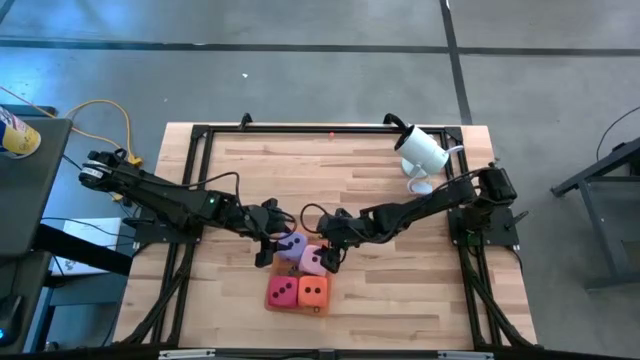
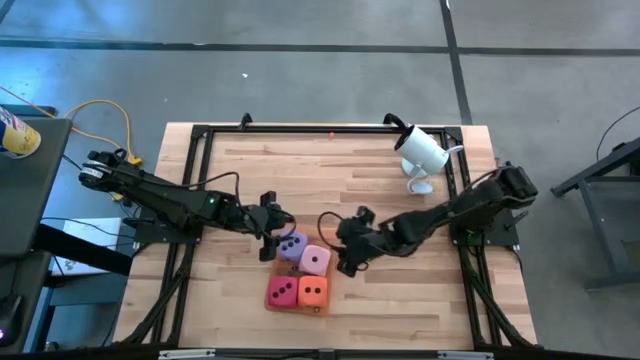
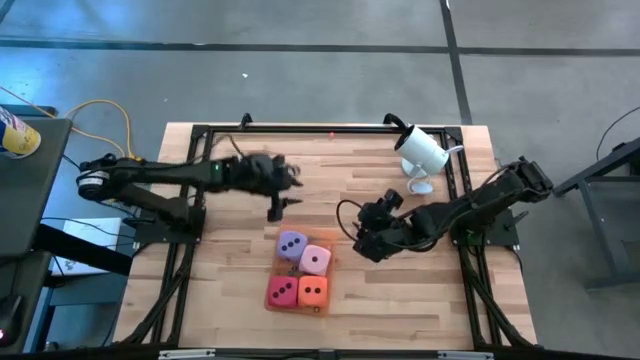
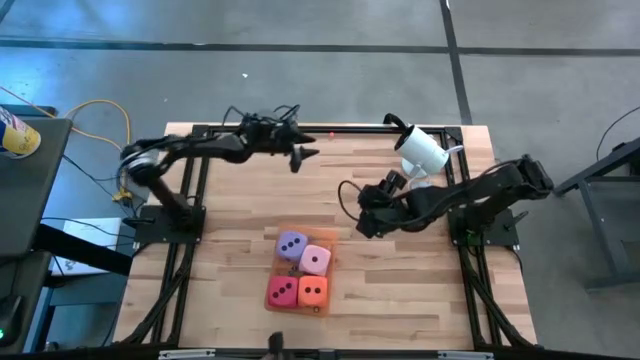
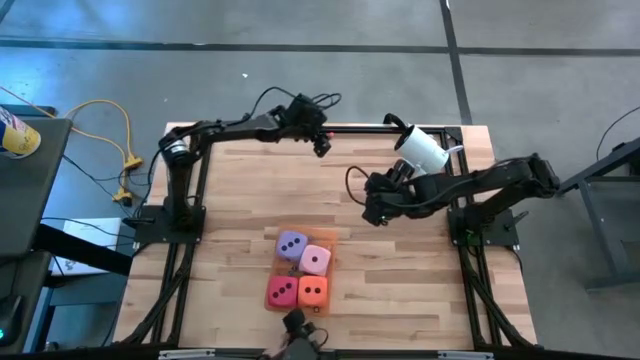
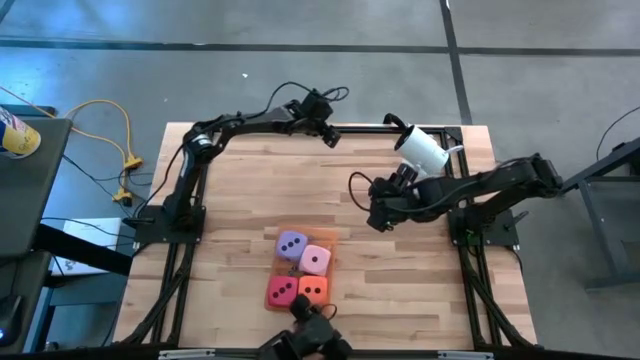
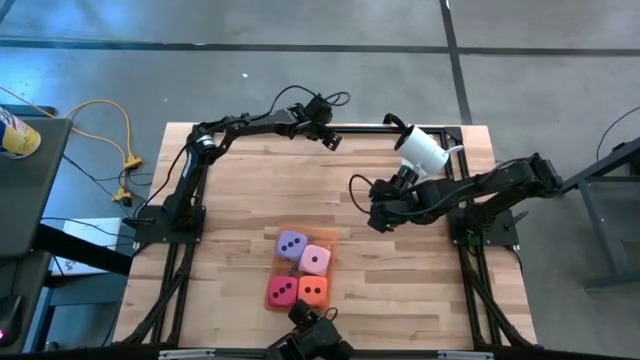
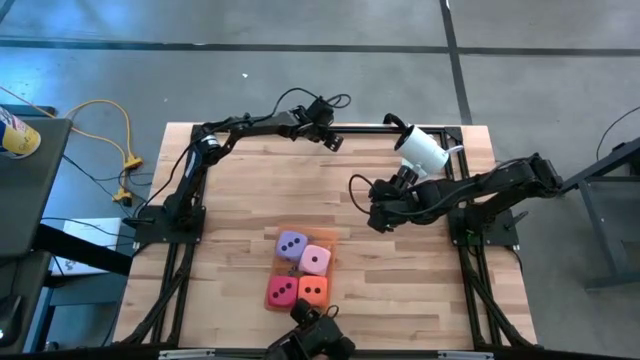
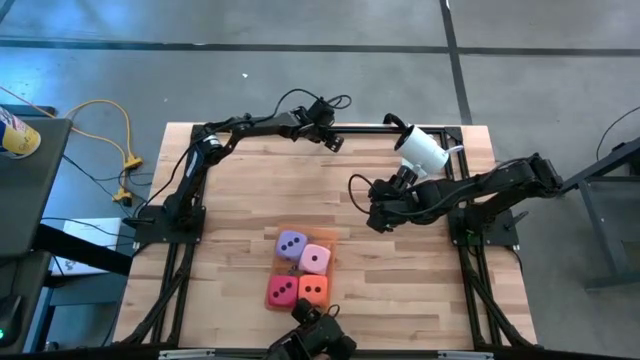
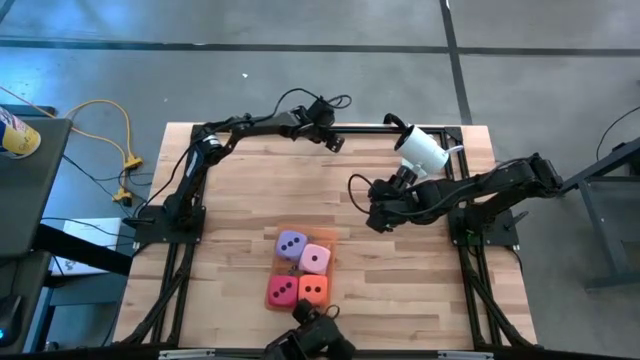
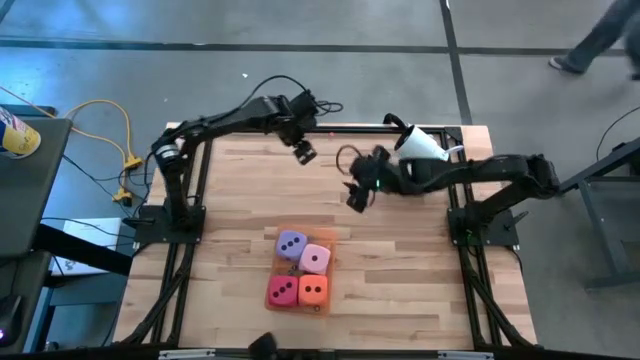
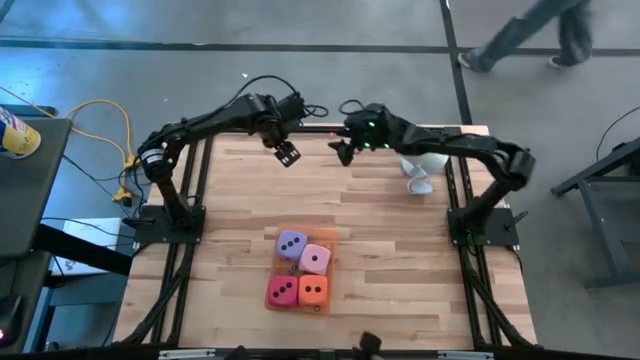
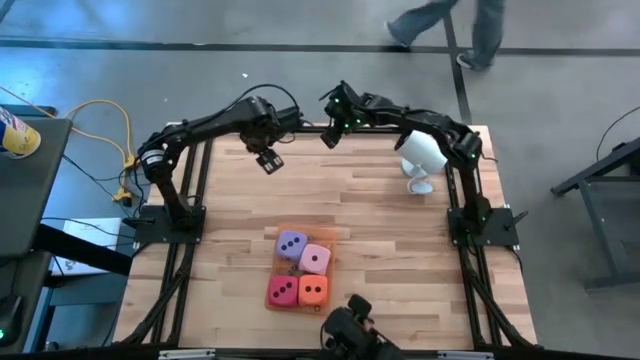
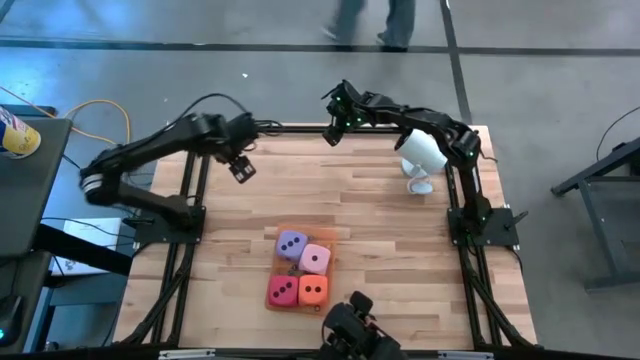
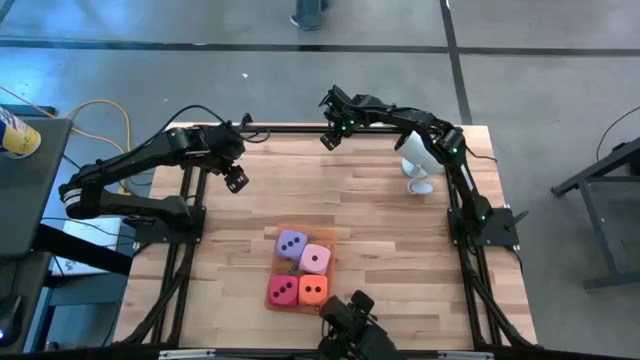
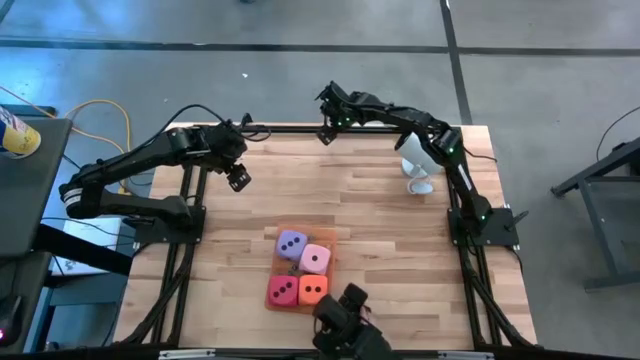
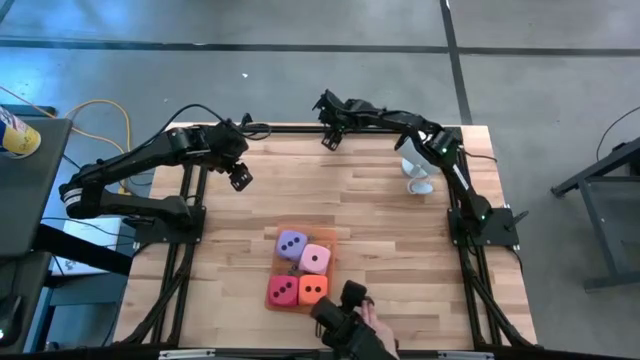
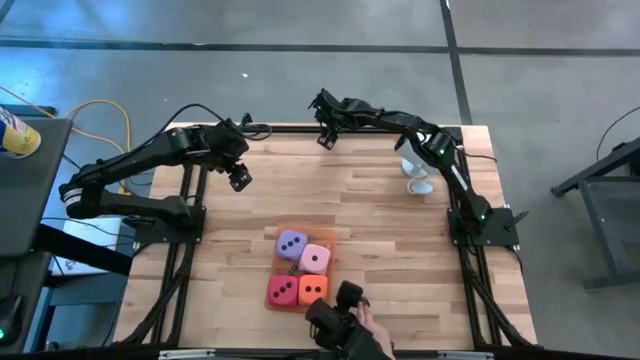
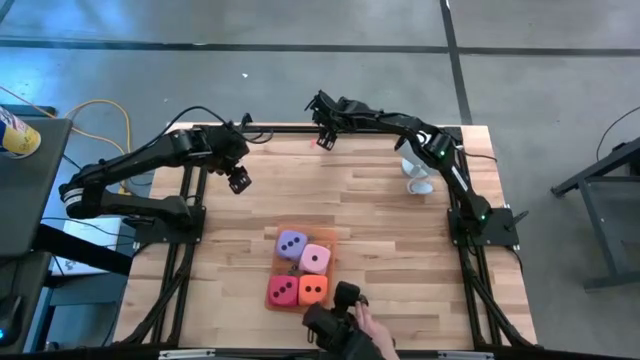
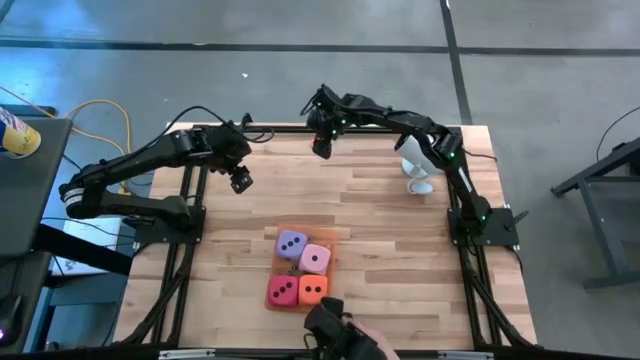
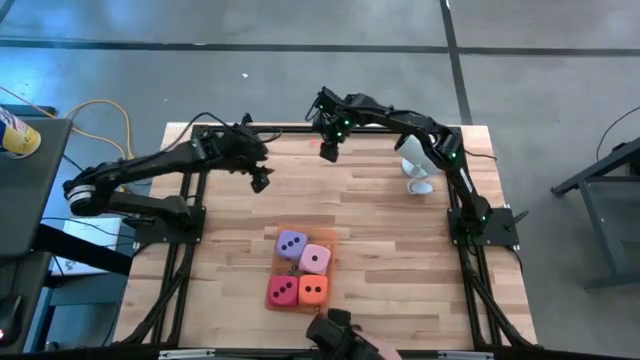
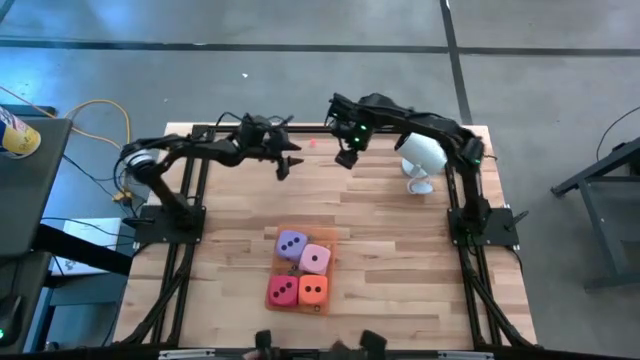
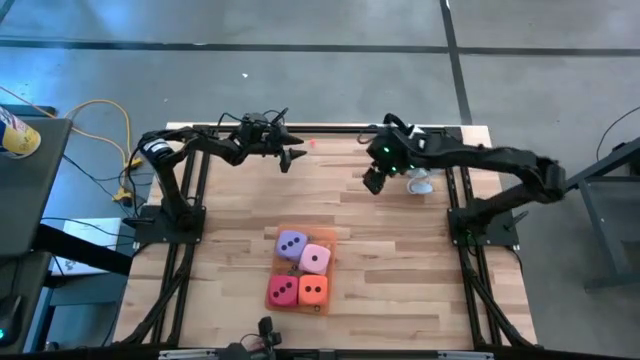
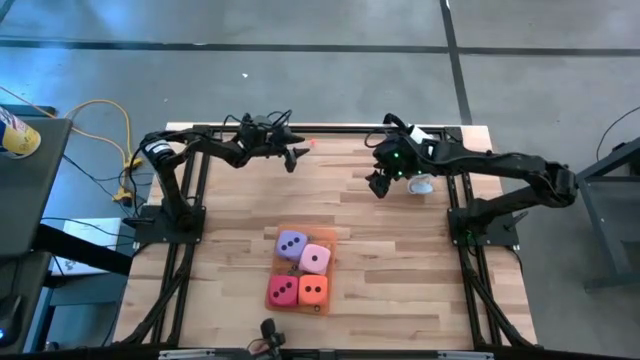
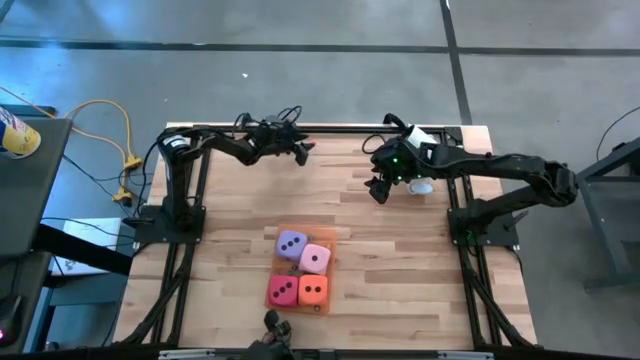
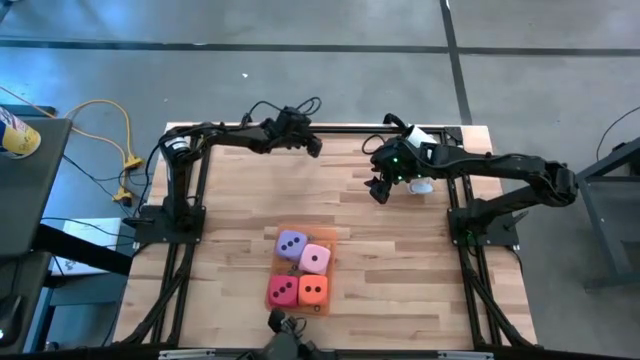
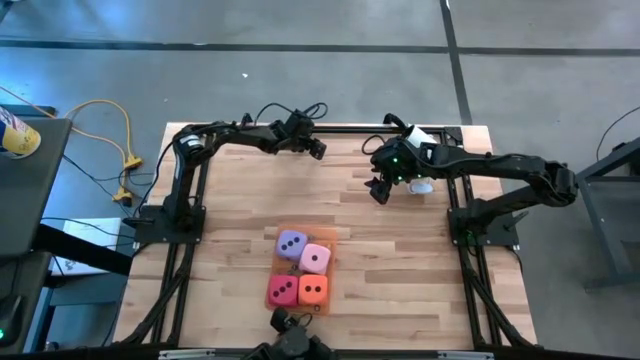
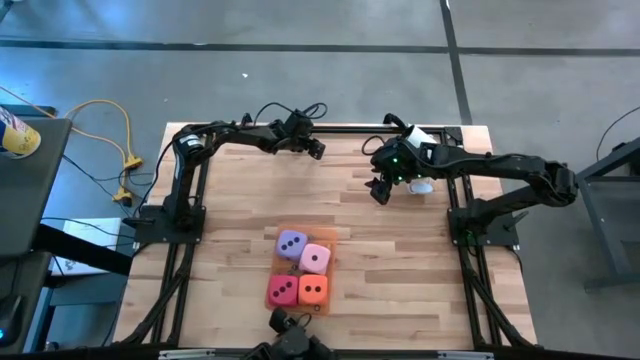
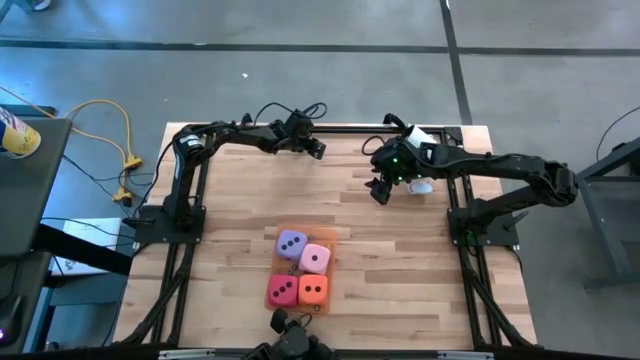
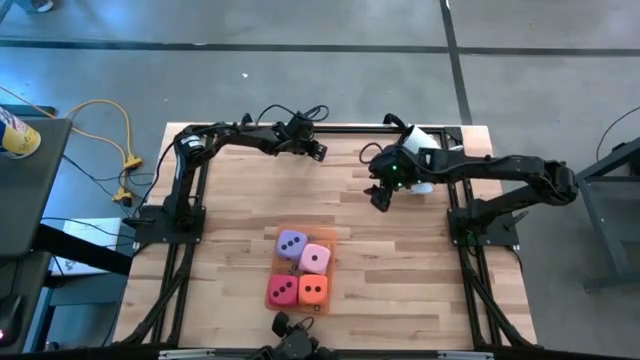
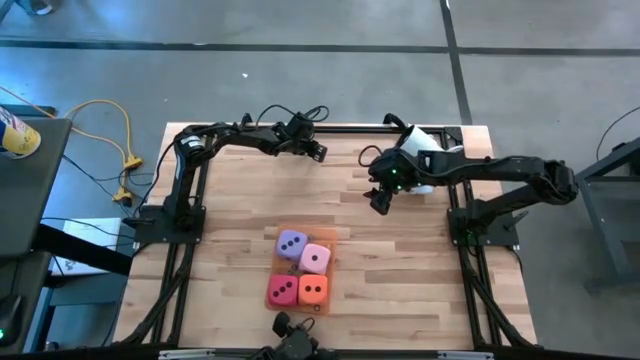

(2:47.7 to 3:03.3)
Task: Pick & Place Dice
Put the small orange dice into the orange bin

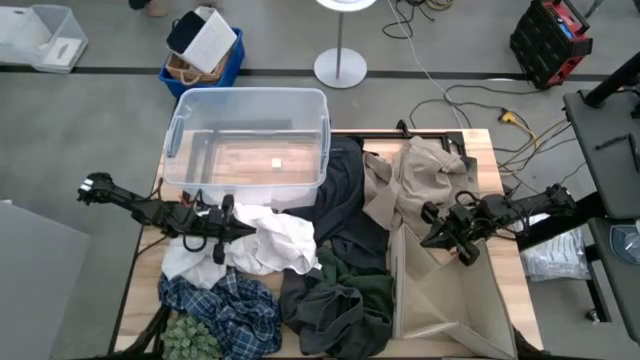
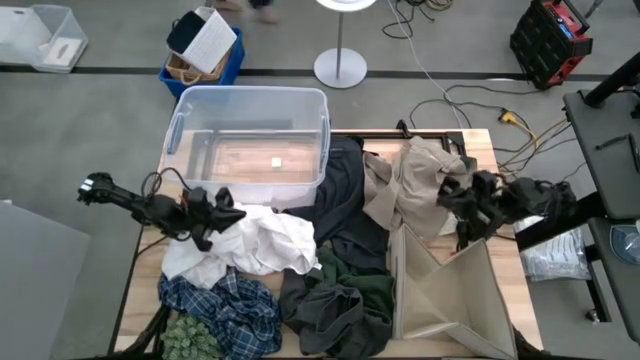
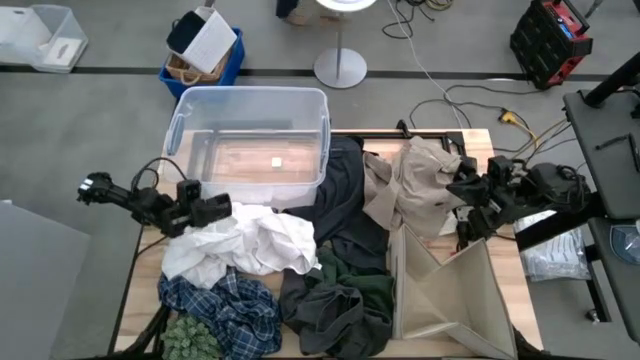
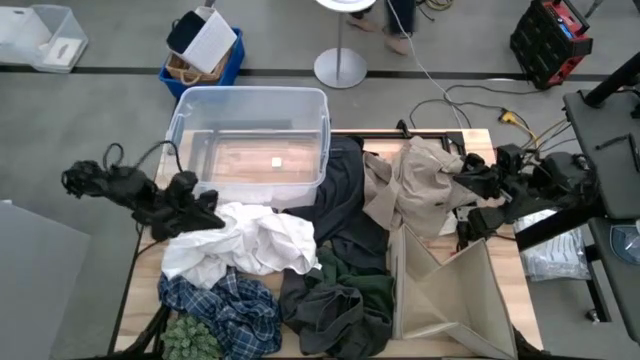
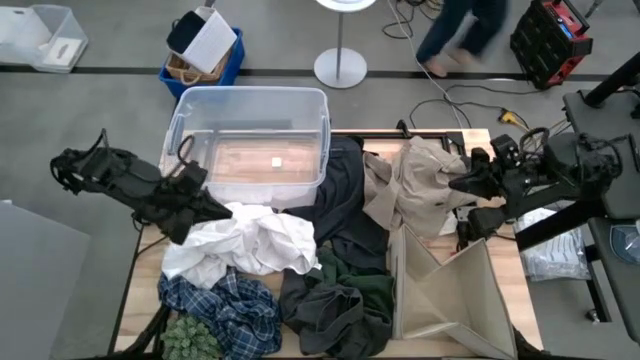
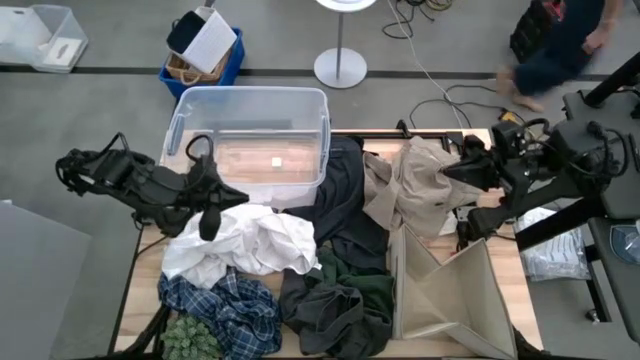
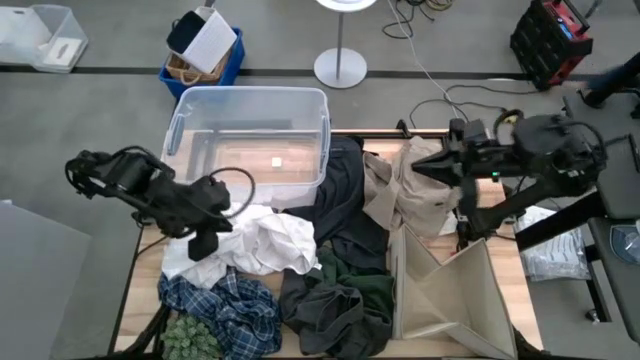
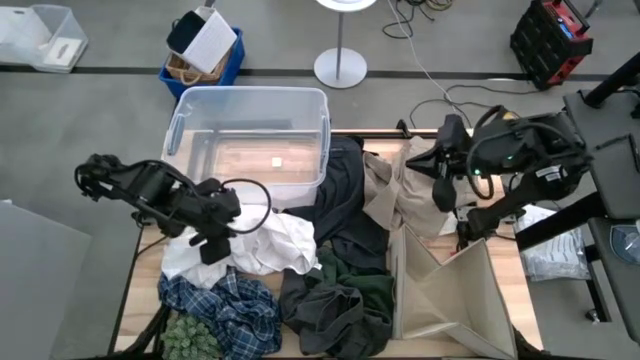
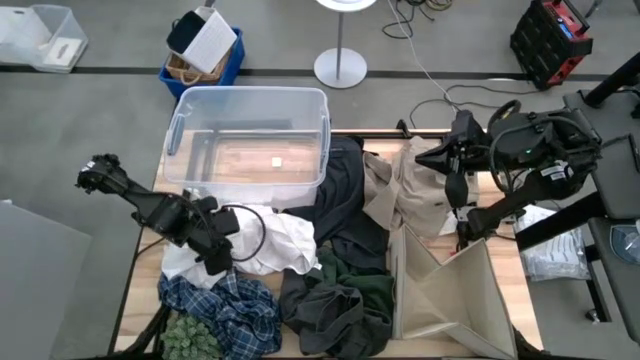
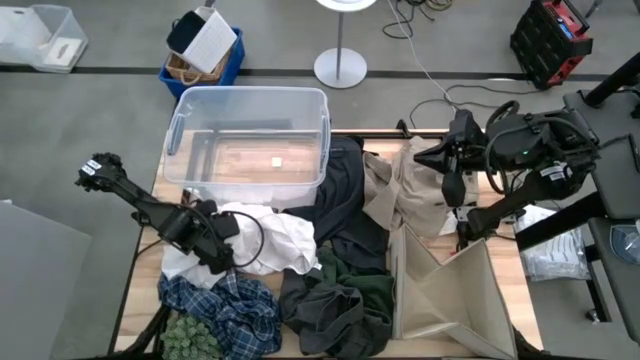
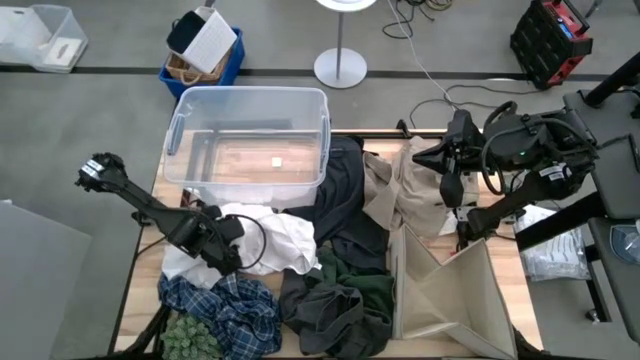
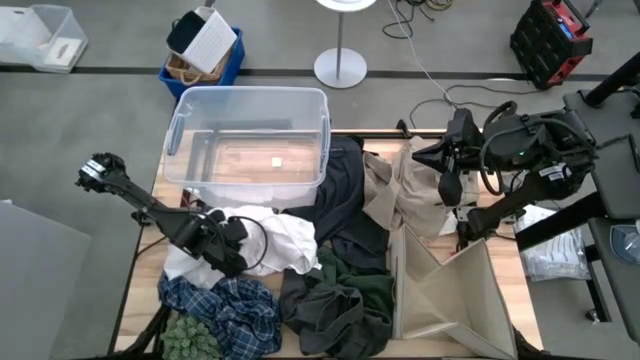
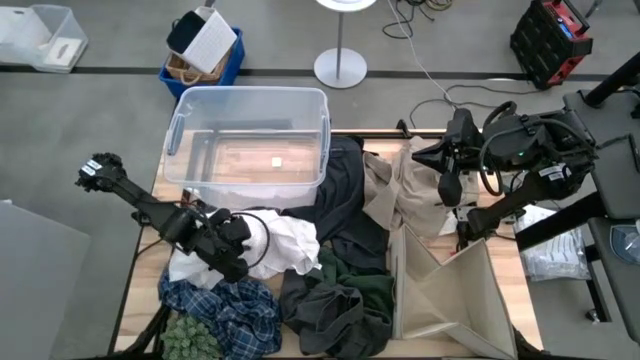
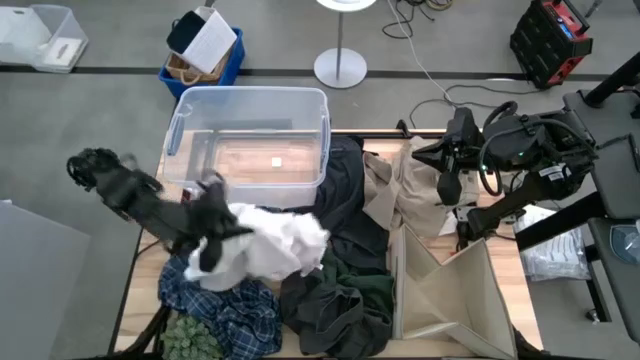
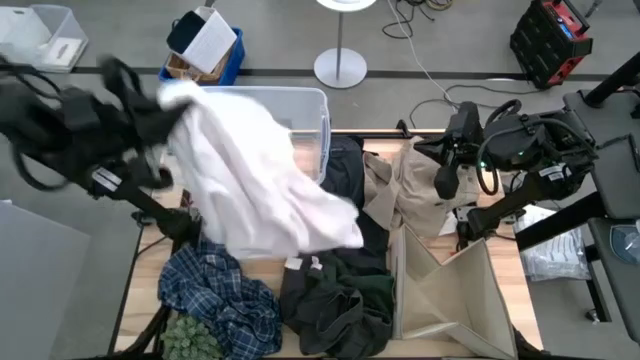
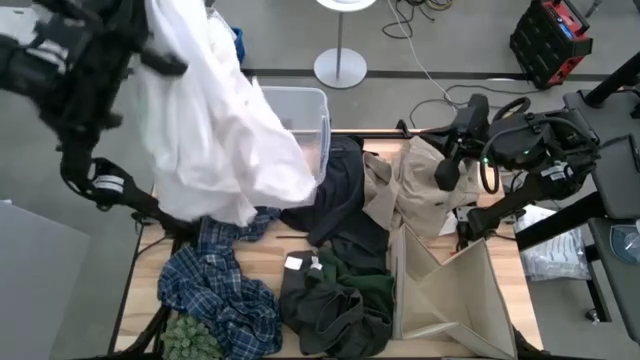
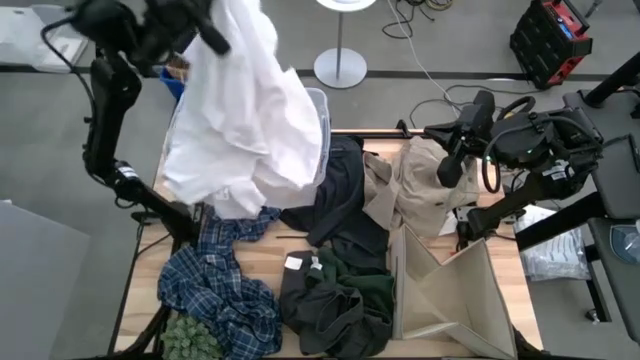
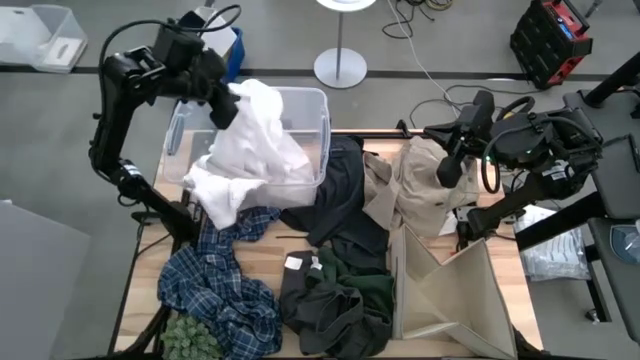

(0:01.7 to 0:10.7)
Task: Sort clothes
Put the white shirt into the transparent bin
